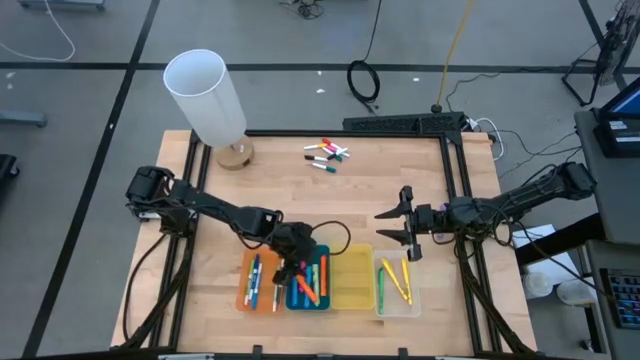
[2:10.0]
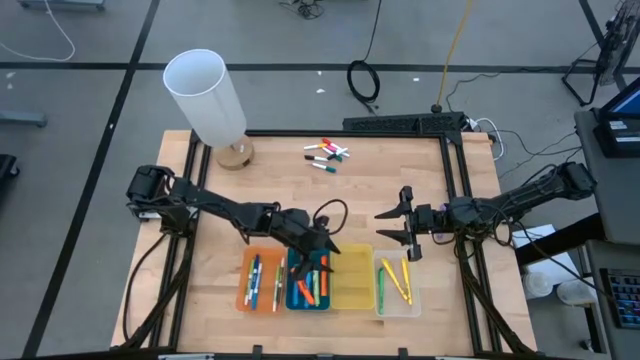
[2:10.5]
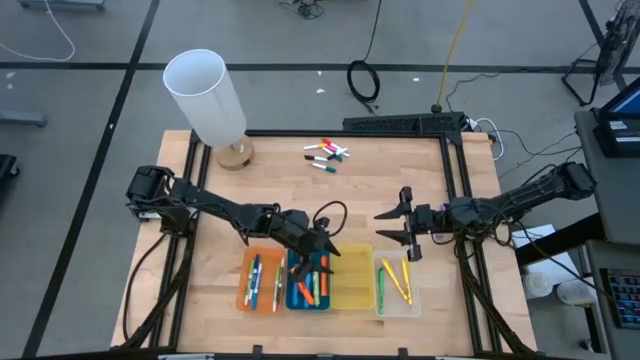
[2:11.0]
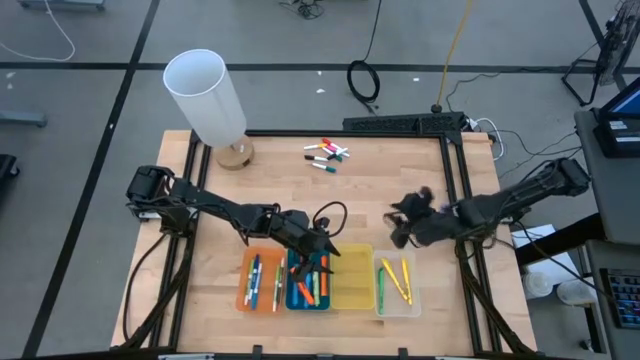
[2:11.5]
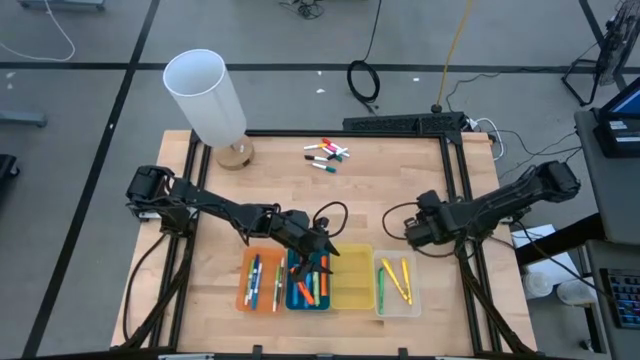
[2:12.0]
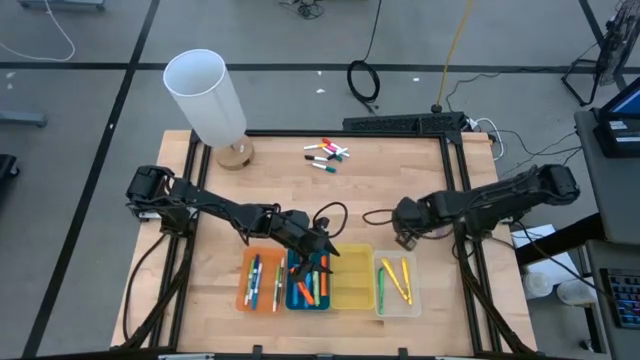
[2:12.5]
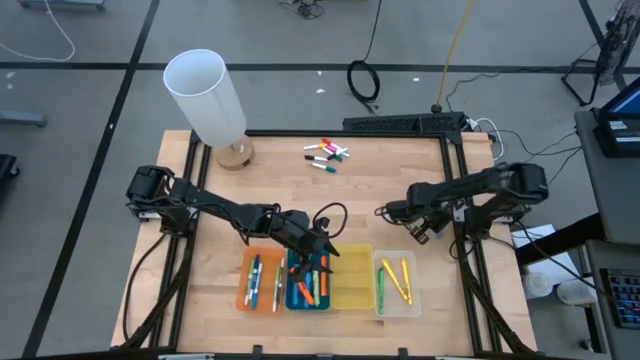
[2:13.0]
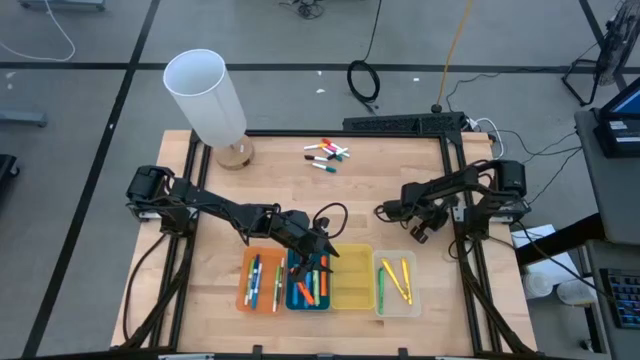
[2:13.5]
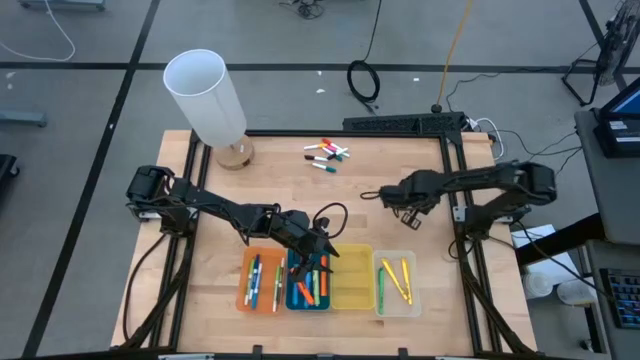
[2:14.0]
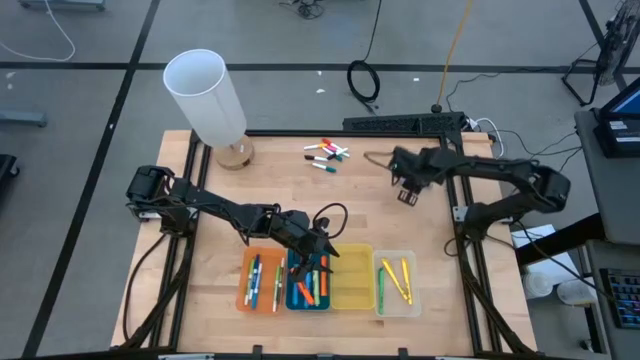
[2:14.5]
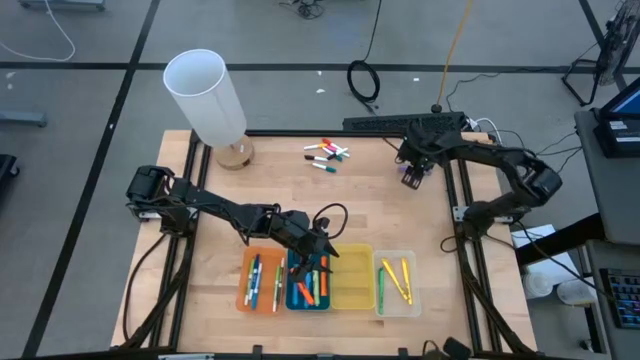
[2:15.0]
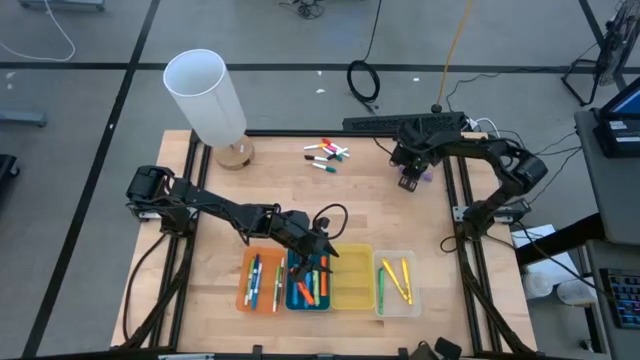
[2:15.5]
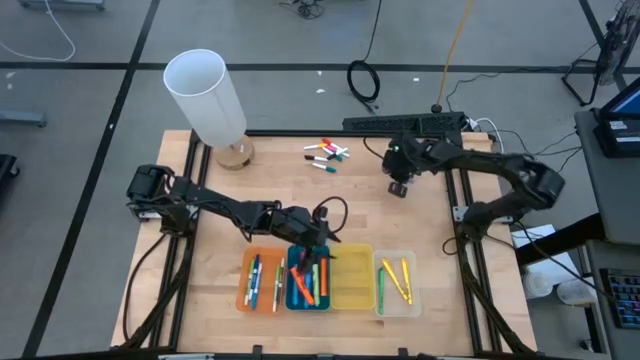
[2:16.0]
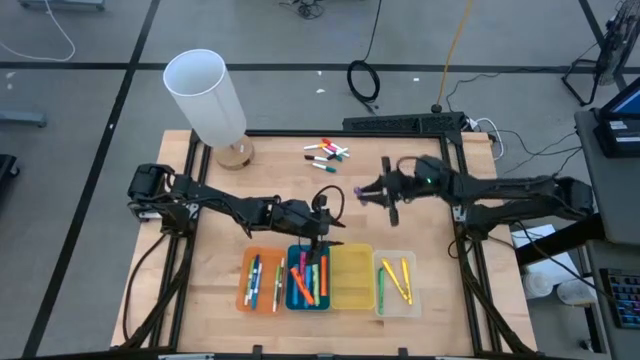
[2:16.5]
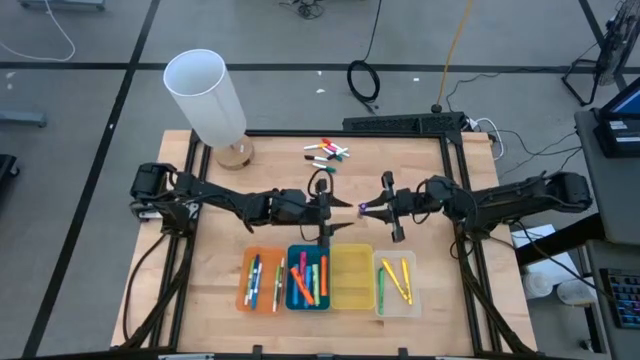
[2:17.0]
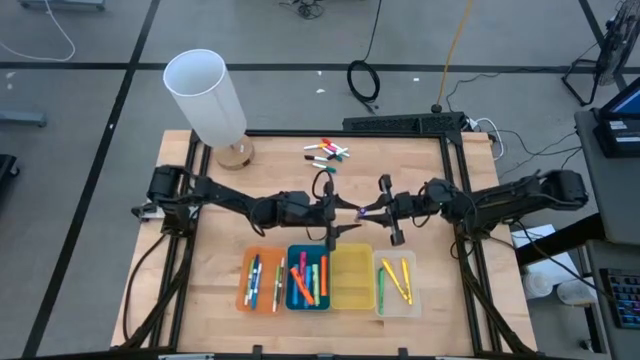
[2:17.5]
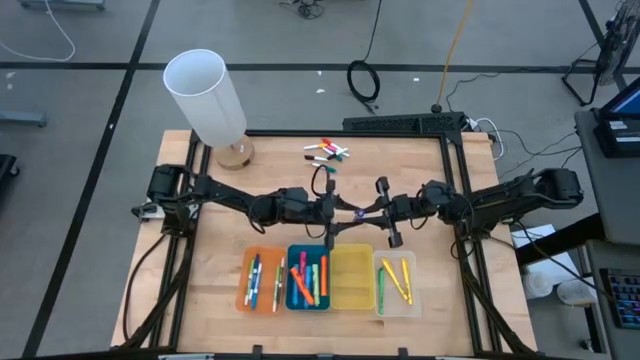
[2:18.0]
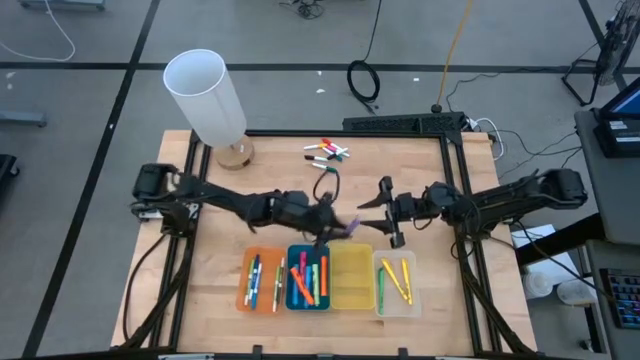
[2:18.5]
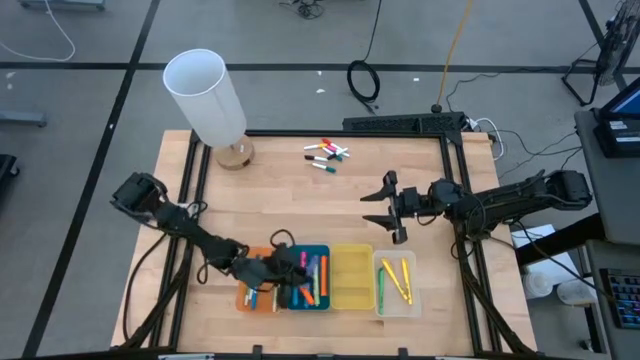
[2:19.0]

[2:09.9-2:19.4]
Task: Pick & Place Markers
Put the purple highlighter pen into the blue bin

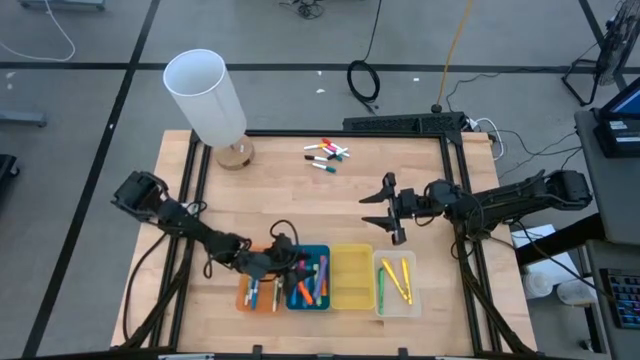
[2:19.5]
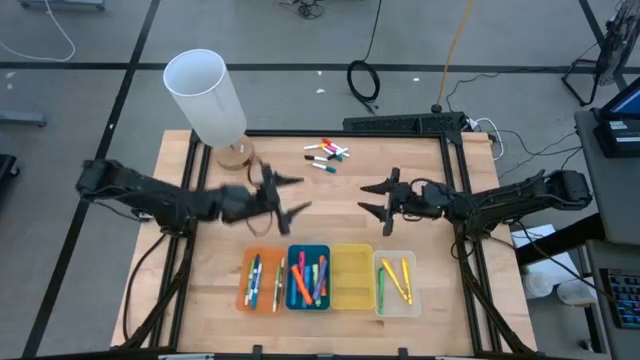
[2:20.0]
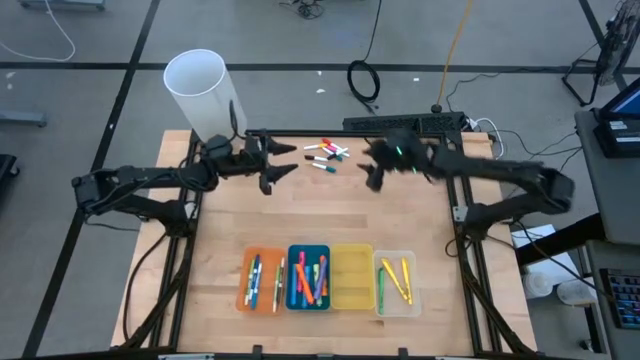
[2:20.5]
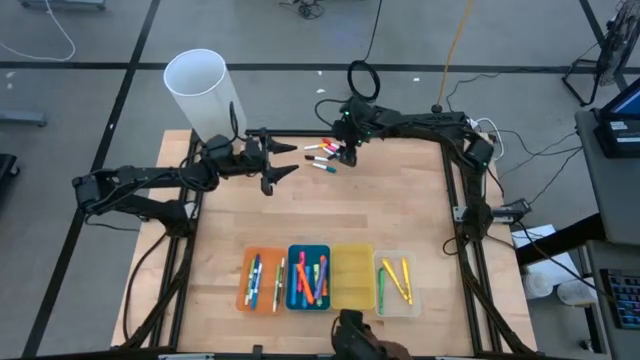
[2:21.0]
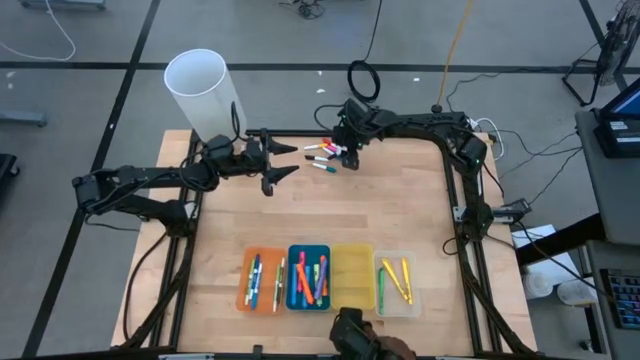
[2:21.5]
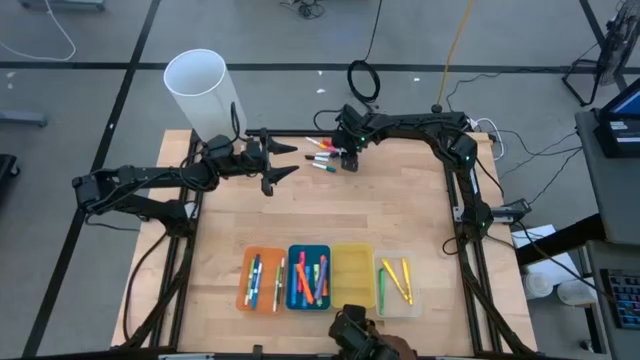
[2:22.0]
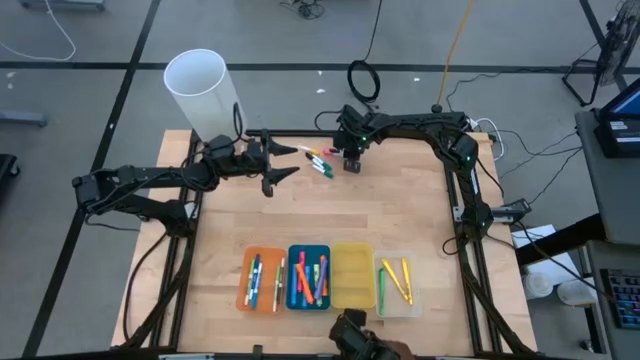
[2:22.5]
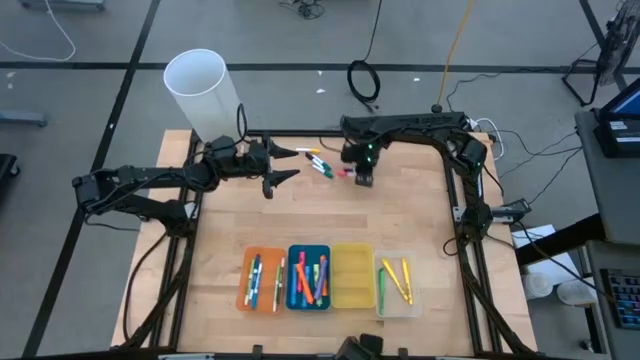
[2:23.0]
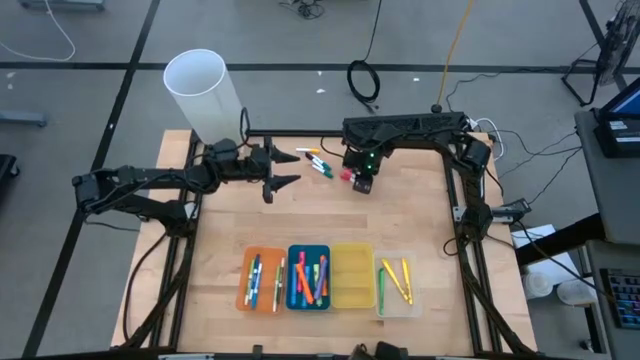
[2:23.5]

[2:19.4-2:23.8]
Put the red highlighter pen into the yellow bin

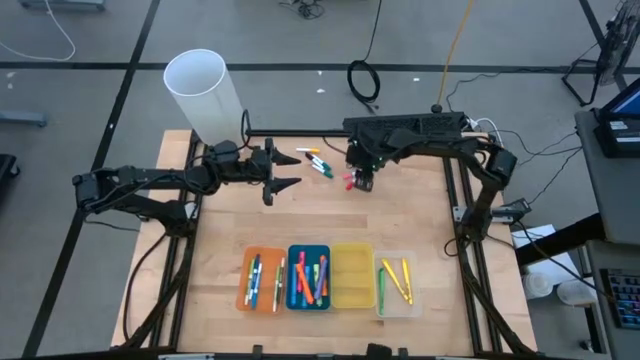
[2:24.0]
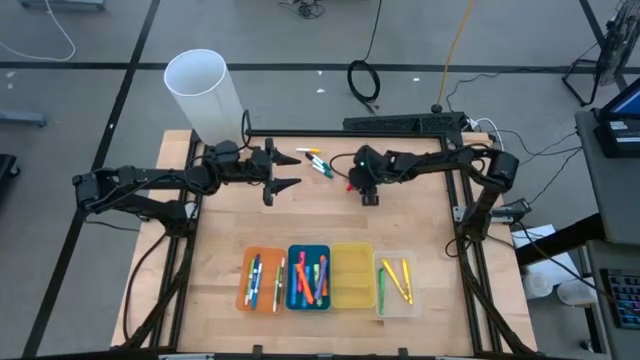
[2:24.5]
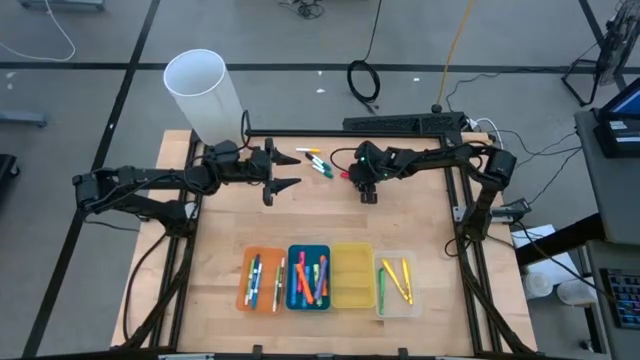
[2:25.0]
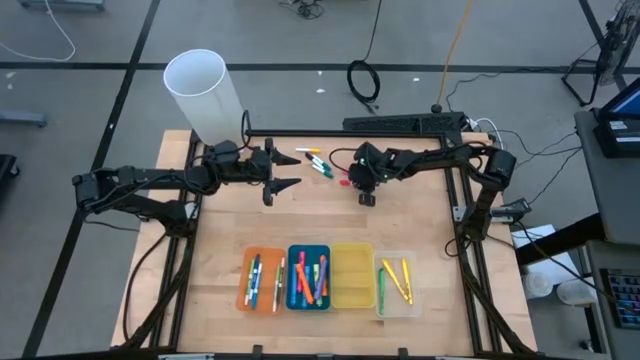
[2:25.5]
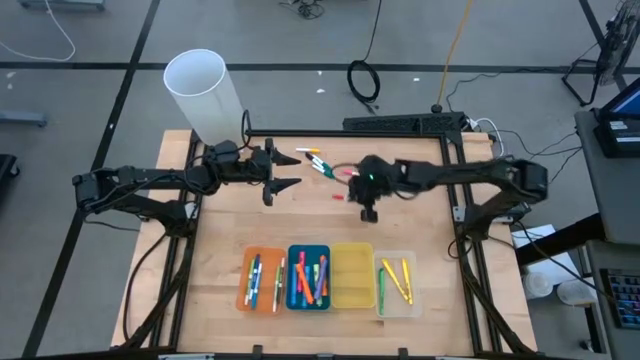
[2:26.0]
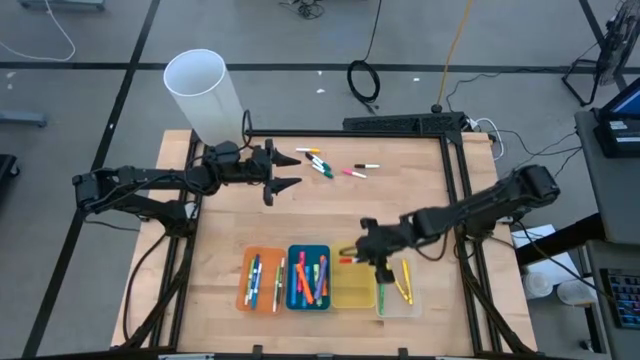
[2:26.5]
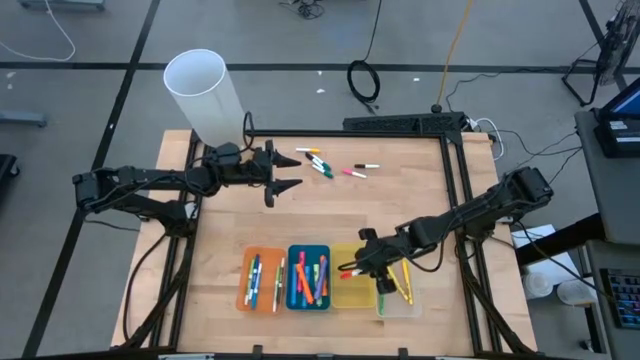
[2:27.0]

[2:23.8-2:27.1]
Put the red highlighter pen into the yellow bin

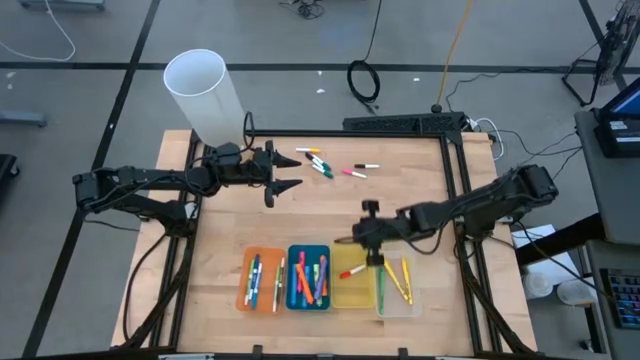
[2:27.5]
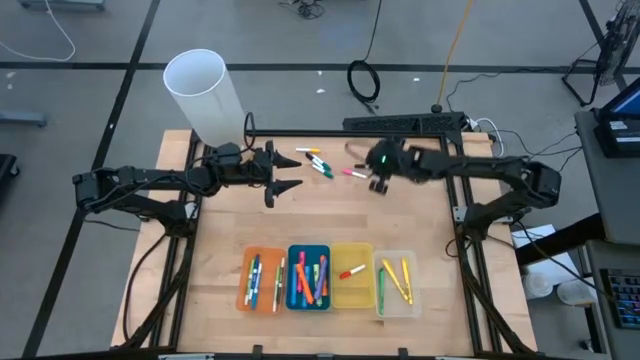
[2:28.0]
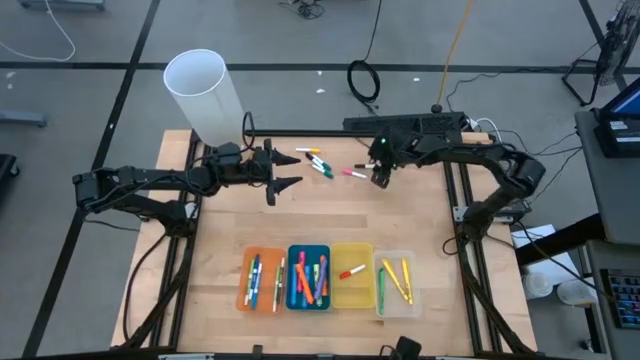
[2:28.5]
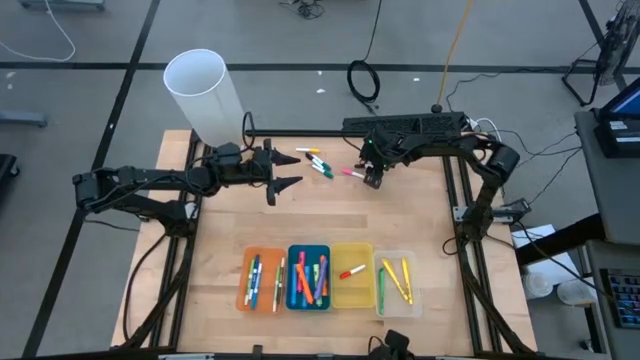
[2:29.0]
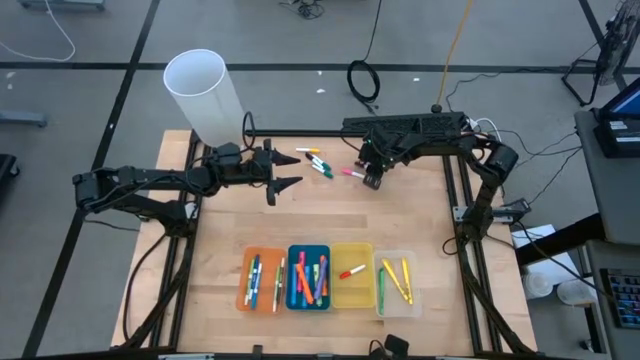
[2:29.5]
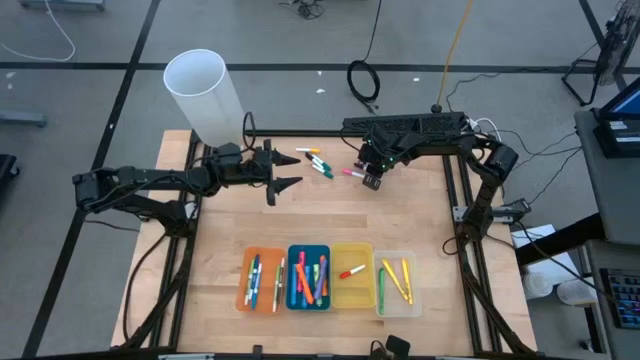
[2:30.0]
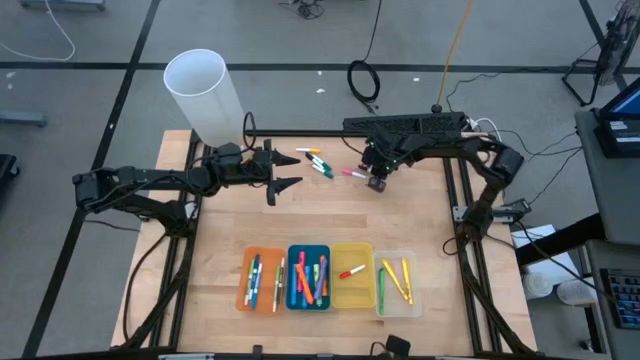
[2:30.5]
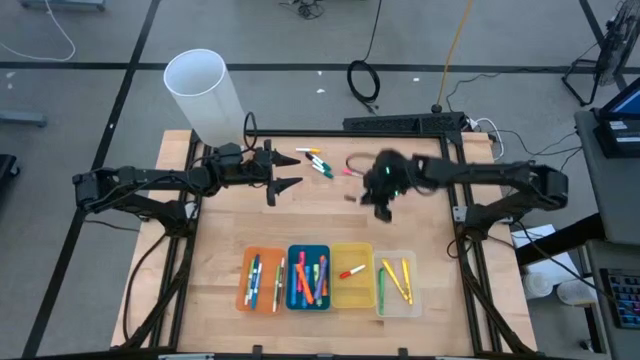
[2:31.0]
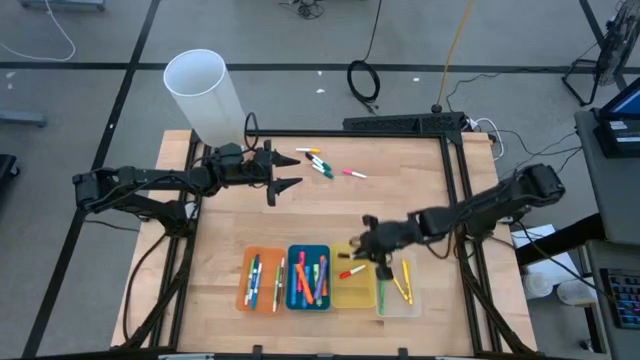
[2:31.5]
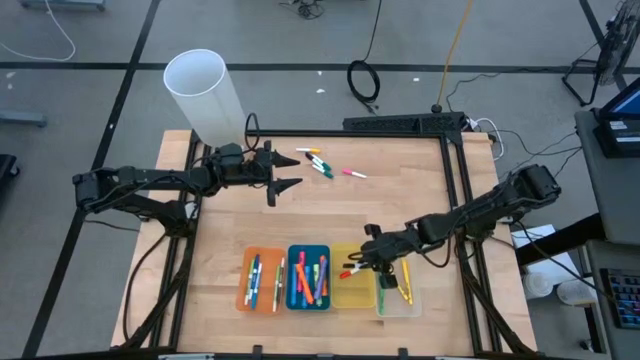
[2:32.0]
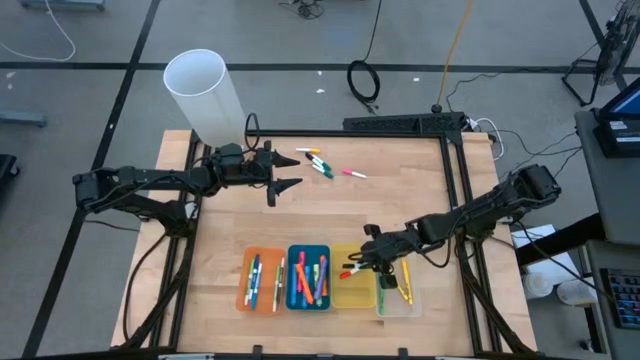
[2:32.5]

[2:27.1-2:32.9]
Put the right black highlighter pen into the yellow bin
